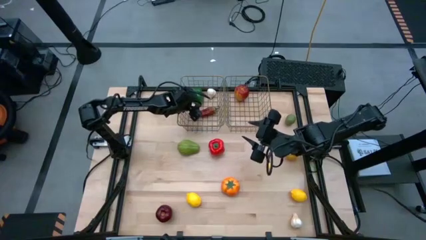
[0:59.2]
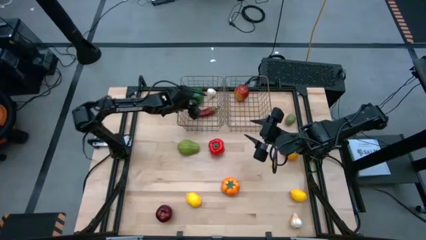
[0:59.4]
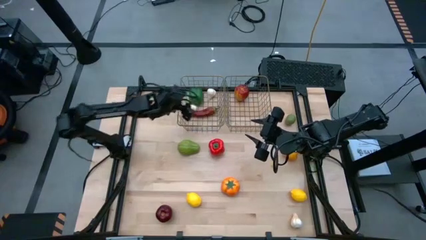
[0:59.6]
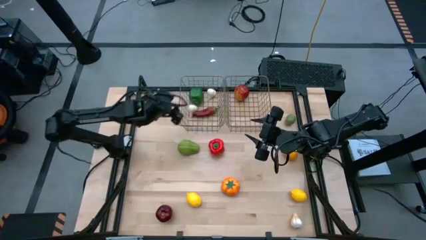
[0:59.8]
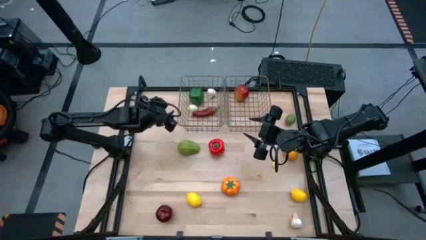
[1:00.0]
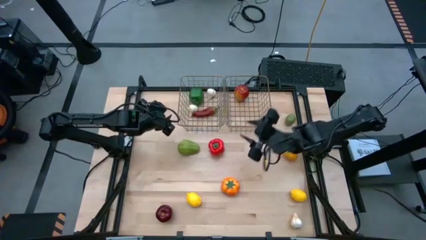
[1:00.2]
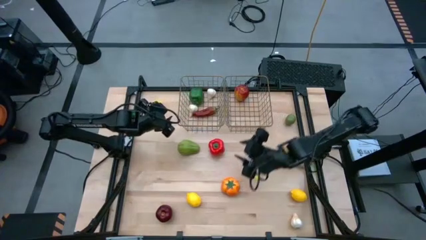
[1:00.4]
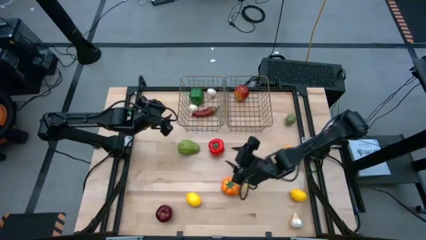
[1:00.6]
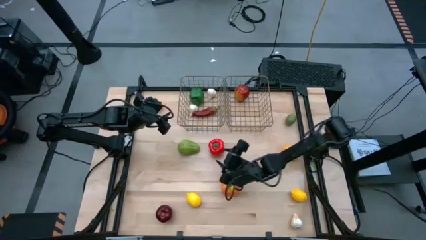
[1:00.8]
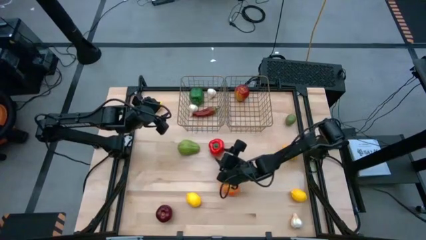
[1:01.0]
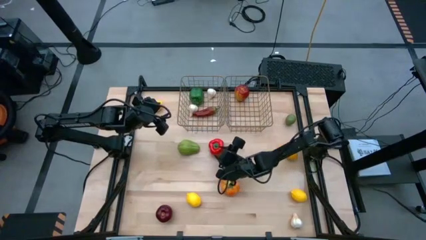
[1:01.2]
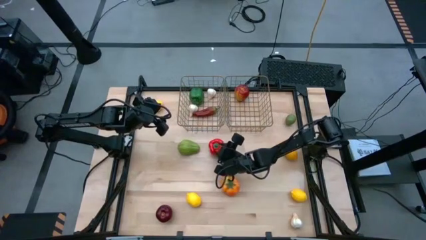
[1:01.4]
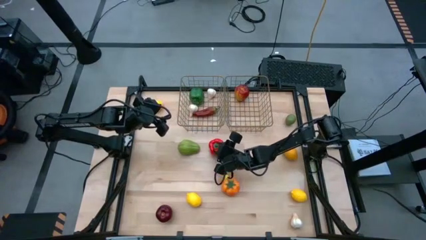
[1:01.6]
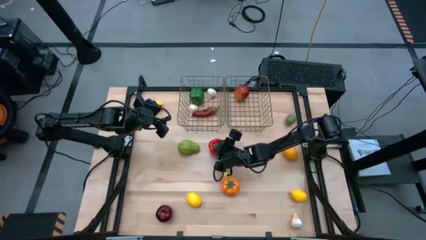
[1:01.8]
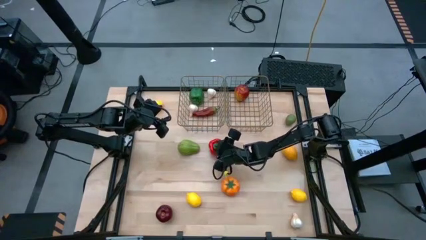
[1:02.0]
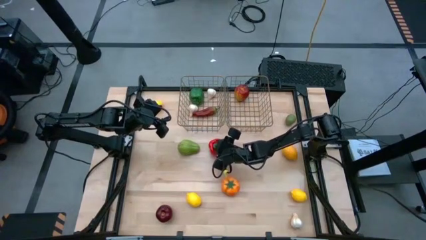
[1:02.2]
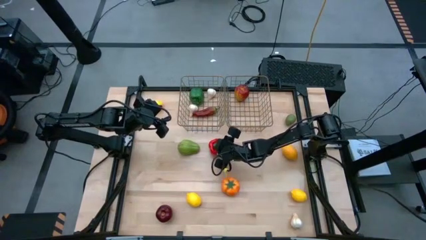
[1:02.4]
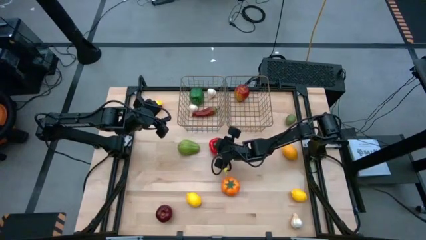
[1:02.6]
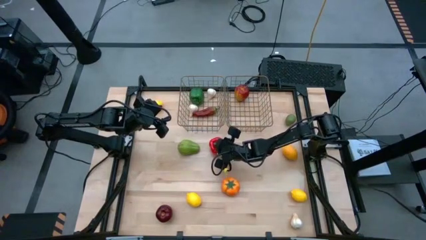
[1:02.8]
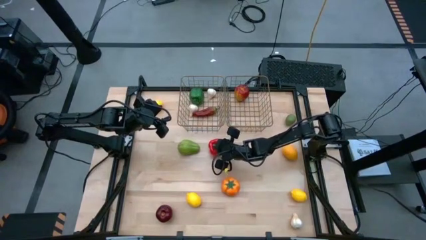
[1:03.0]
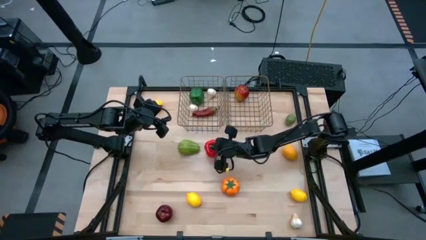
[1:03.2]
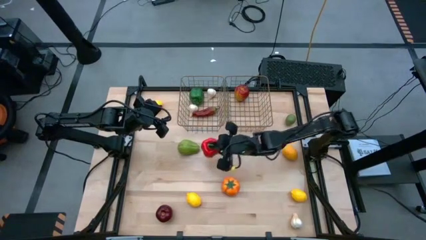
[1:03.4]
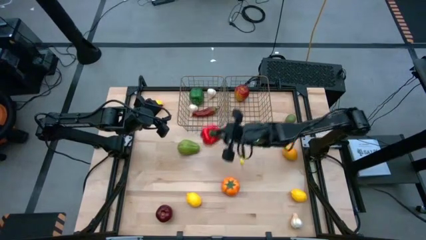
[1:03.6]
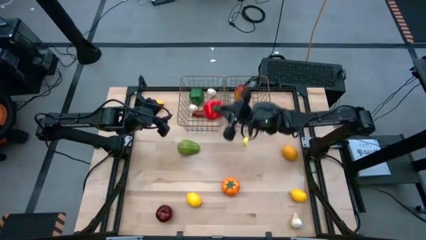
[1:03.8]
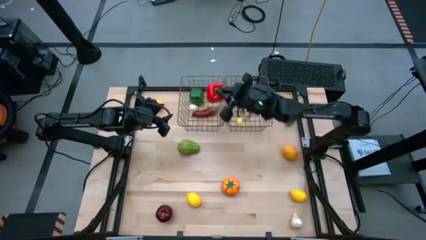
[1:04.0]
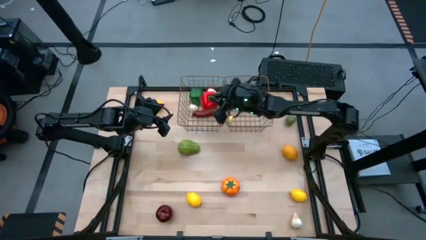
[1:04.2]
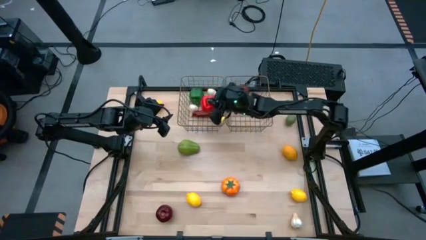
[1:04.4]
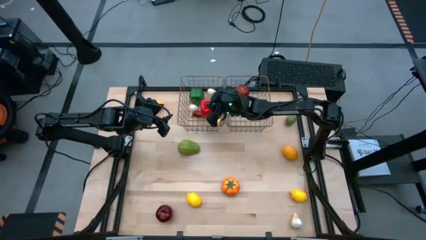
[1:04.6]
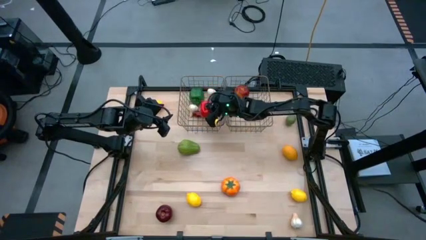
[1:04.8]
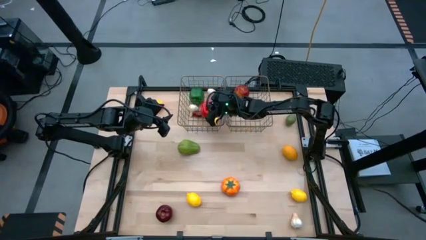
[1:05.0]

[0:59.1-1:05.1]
Task: Sort produce into baskets
Put the red bell pepper into the left mesh basket

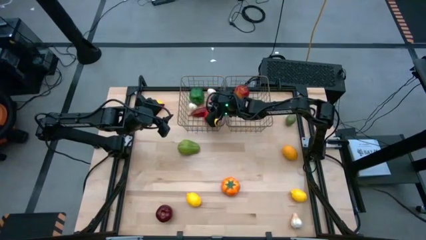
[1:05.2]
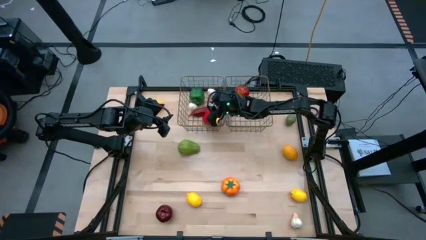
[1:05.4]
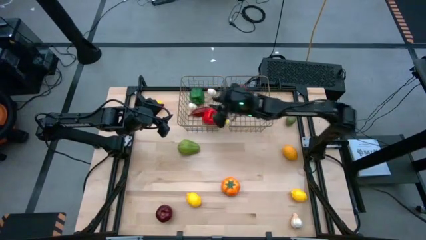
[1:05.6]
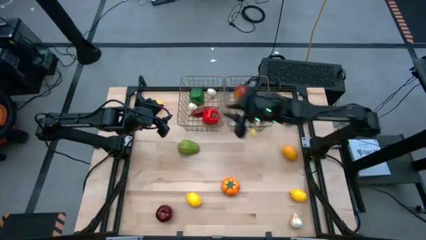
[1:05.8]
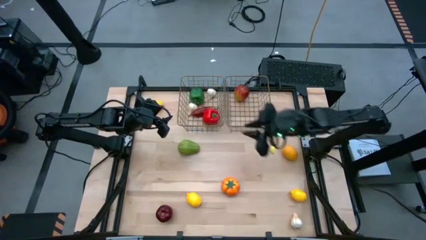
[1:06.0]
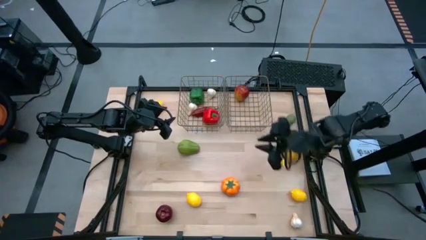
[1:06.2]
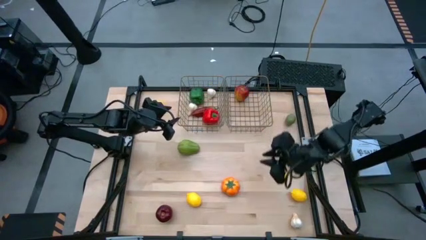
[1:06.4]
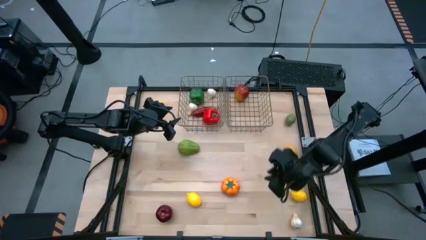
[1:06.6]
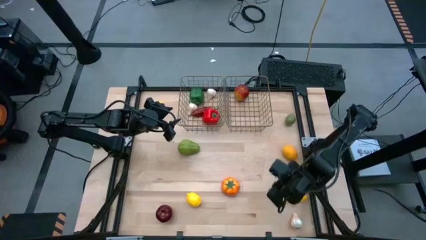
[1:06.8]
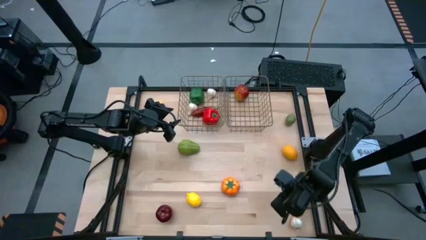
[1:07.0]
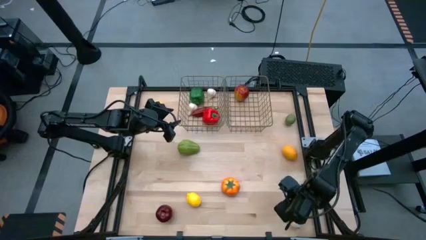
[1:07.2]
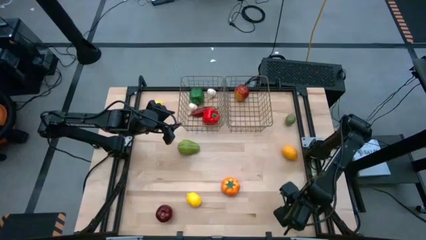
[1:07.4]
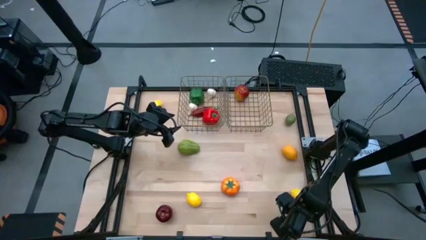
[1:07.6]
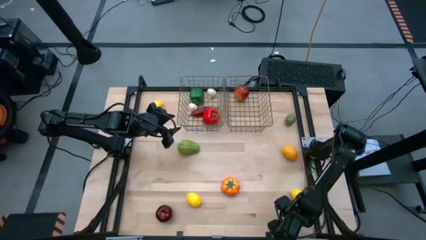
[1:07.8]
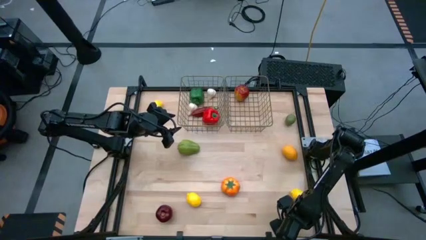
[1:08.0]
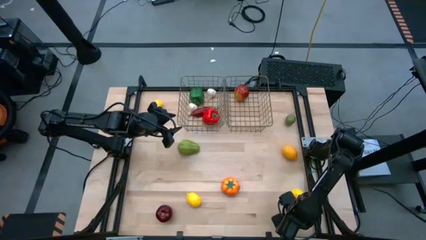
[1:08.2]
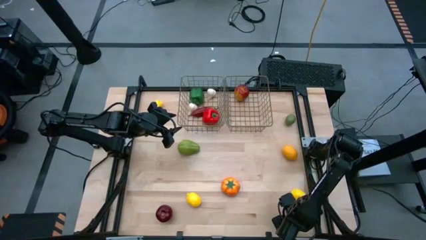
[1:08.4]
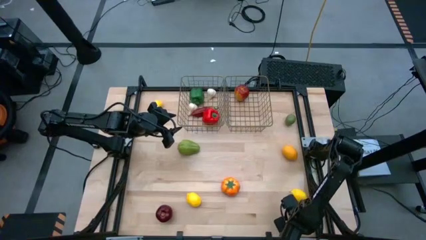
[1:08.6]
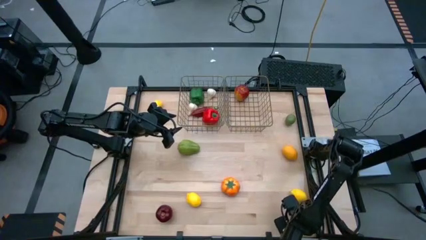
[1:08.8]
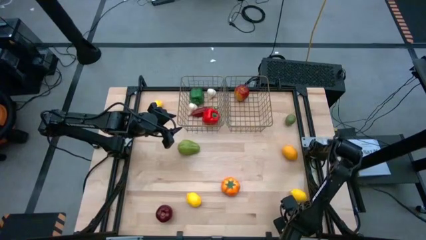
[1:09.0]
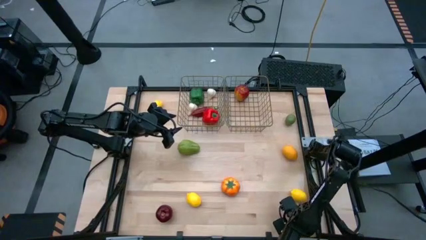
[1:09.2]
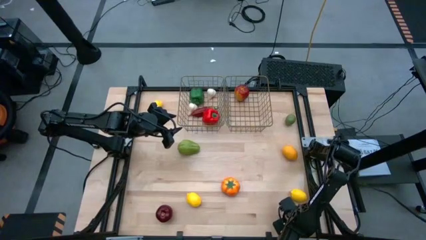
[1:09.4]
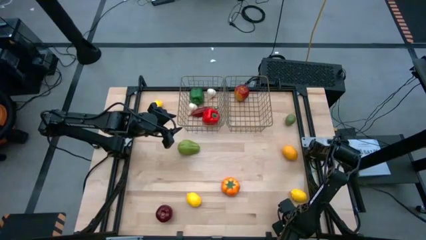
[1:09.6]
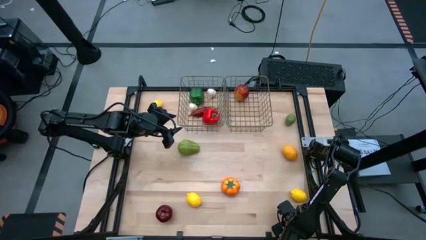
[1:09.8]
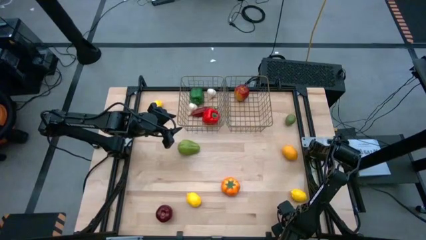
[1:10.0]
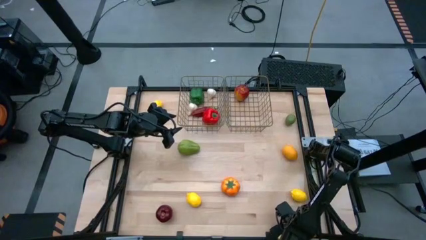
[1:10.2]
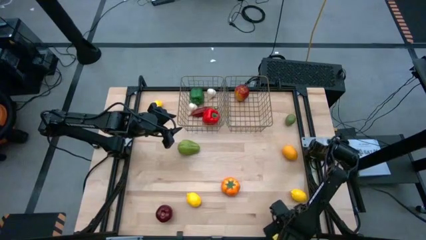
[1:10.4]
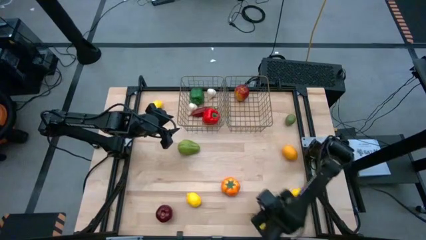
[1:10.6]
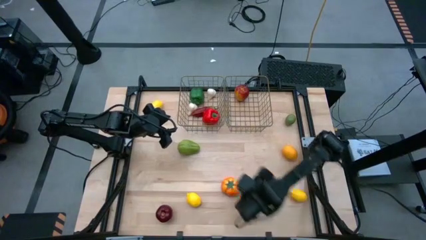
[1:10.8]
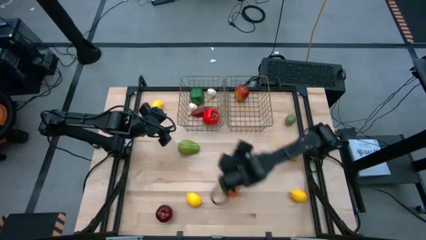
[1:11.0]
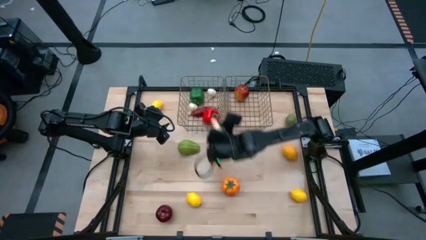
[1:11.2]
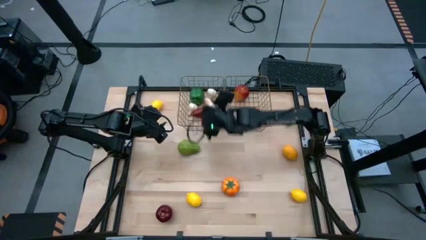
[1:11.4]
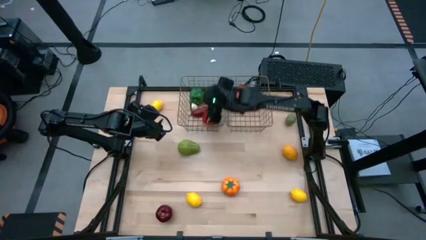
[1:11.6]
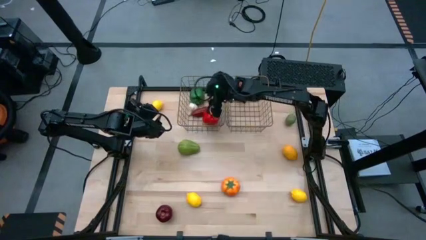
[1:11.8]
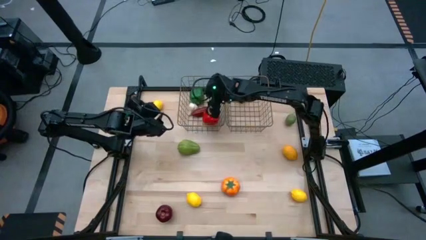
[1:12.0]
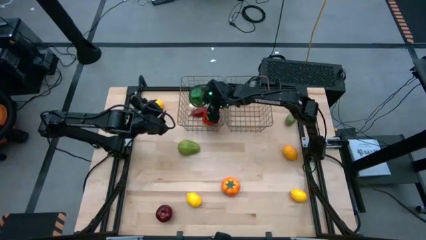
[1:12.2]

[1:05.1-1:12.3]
Put the garlic into the left mesh basket

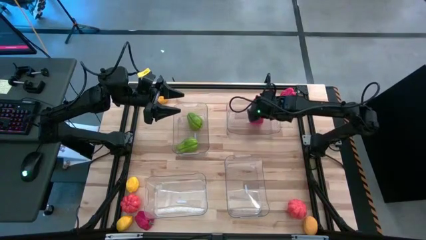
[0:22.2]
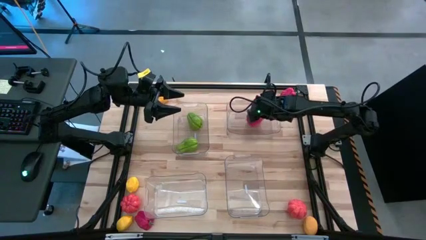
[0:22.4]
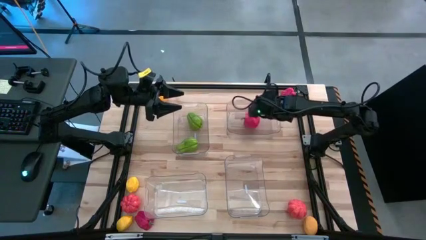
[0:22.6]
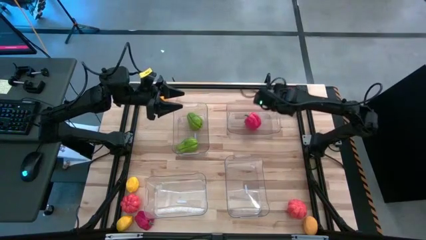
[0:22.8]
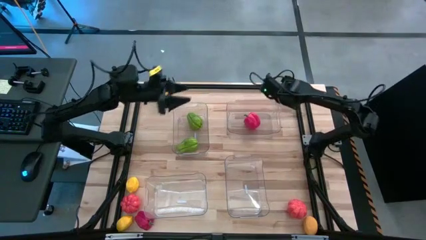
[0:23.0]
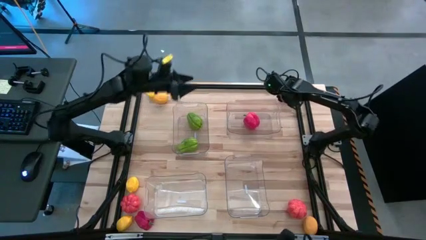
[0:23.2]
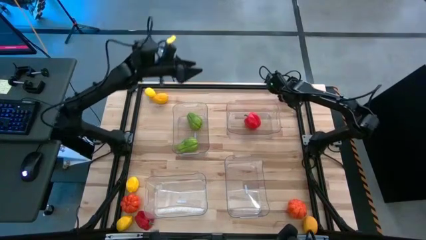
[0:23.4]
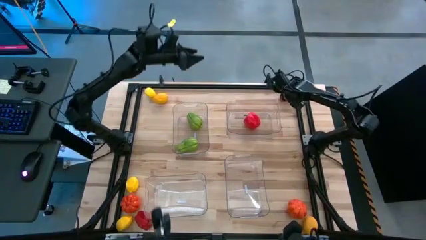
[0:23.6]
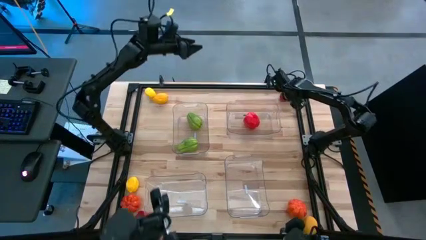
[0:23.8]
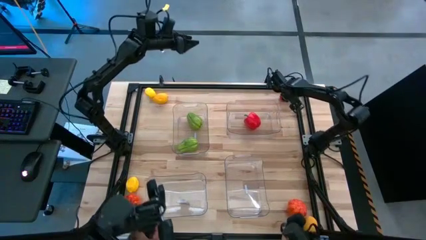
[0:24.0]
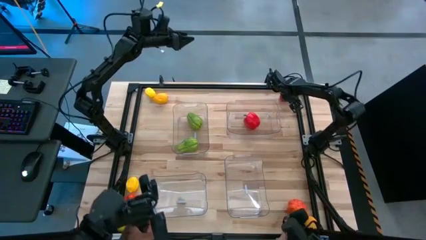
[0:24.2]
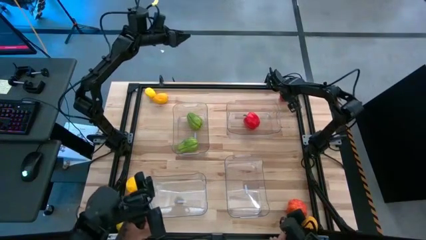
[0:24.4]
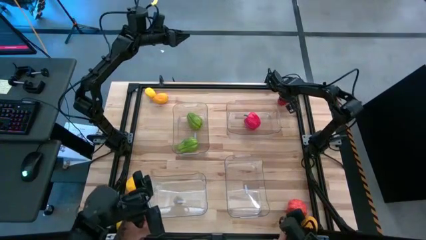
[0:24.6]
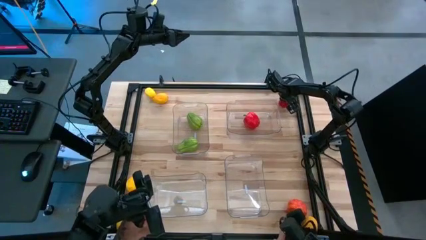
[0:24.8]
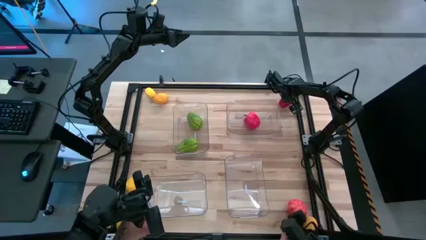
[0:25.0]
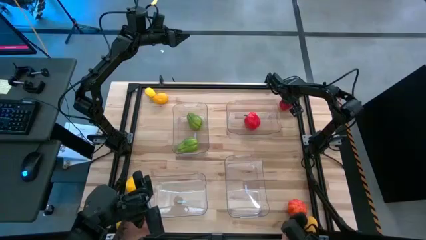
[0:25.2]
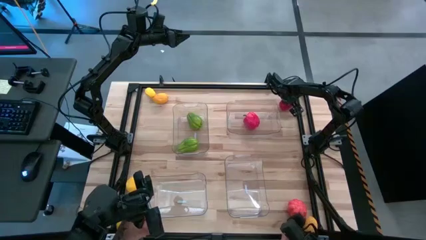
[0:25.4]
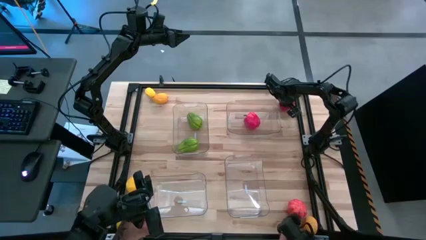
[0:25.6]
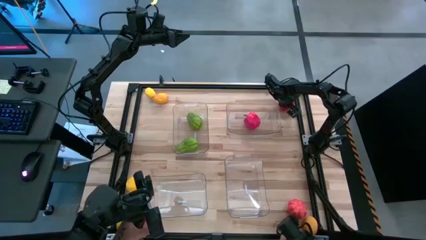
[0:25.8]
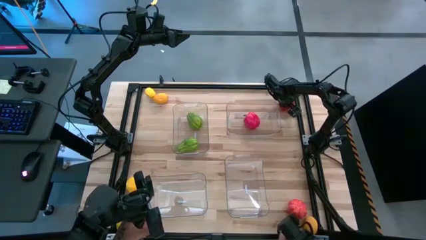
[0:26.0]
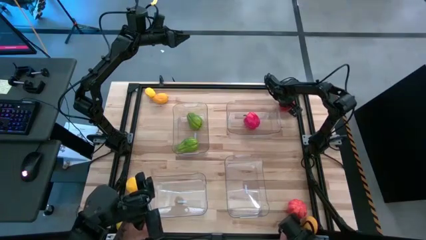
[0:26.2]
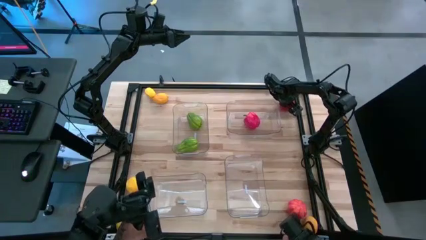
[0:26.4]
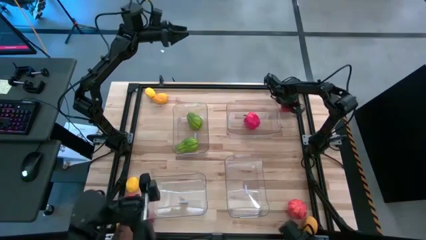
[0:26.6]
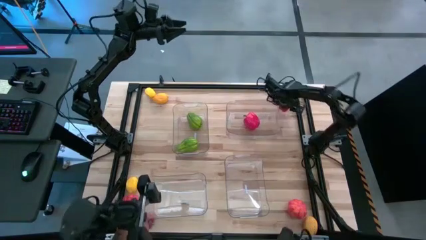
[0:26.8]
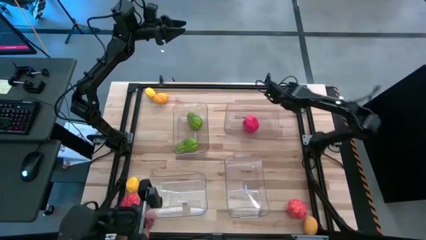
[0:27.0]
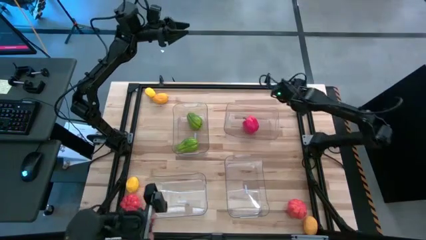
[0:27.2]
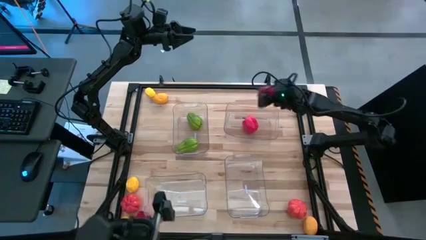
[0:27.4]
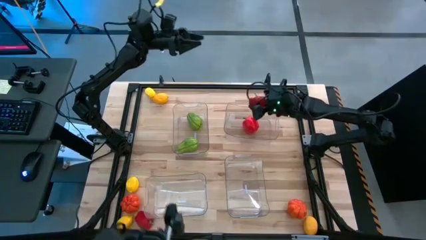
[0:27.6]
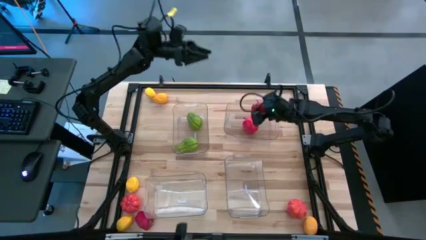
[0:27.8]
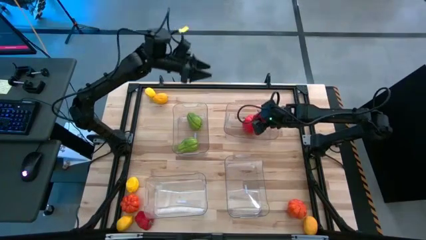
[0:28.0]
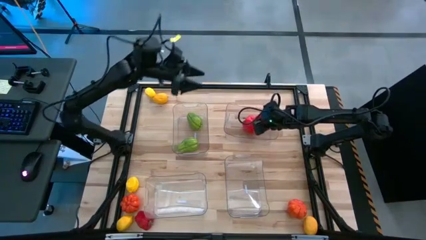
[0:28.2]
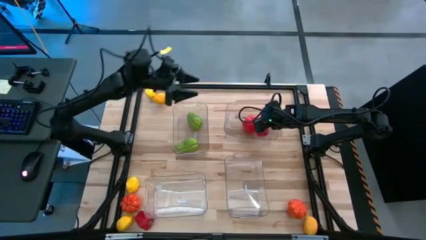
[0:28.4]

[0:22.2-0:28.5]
Task: Sort produce into baskets
Put the top red bell pepper into the top right transparent bin
